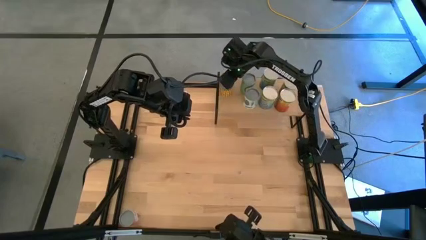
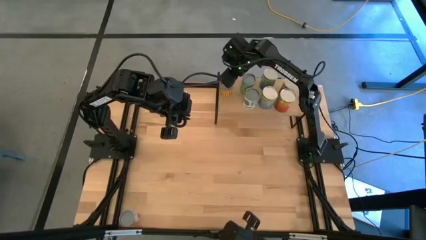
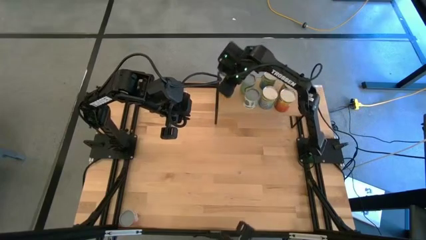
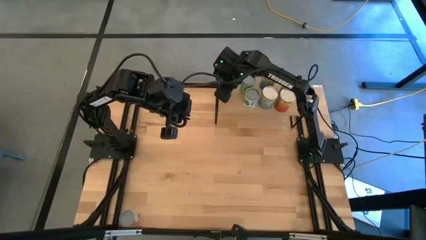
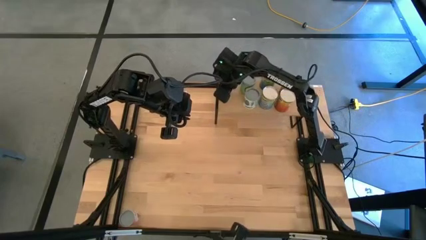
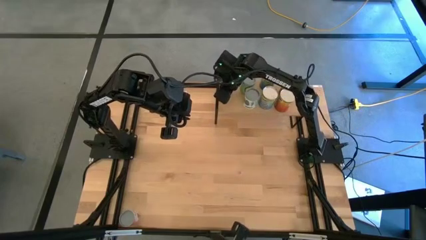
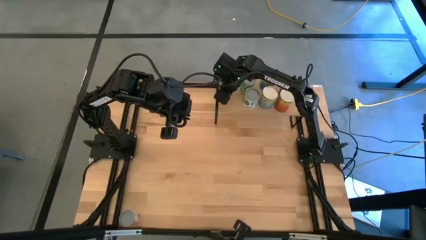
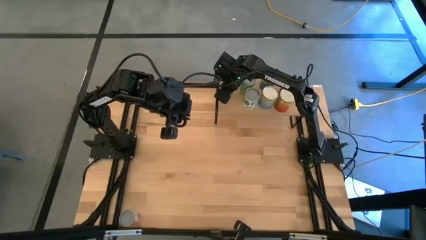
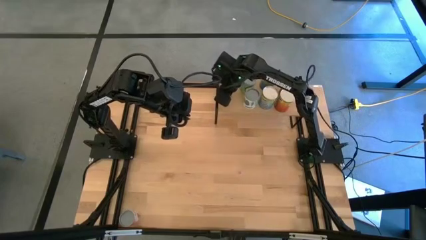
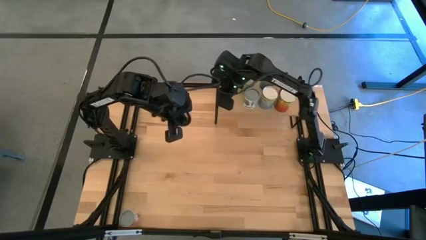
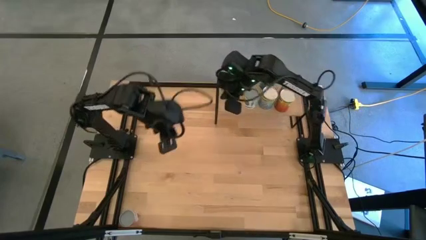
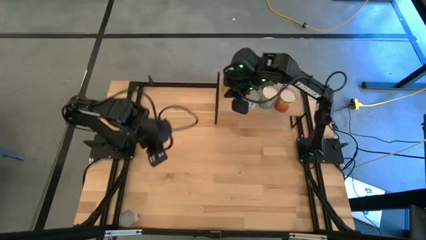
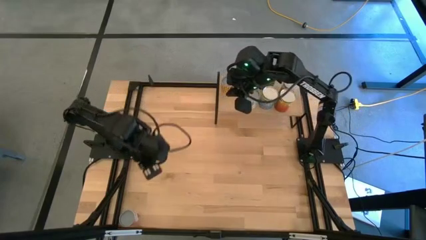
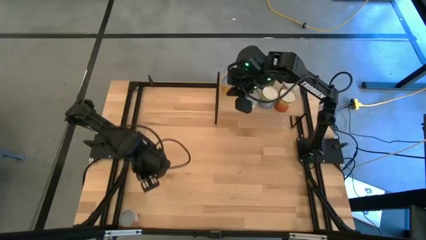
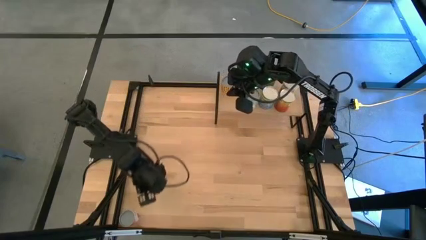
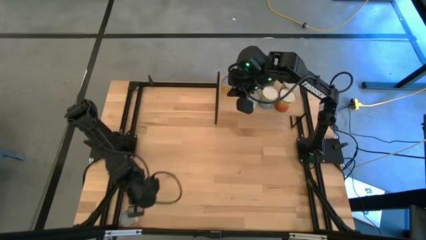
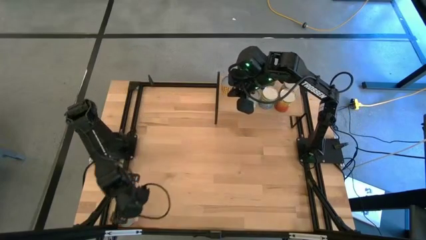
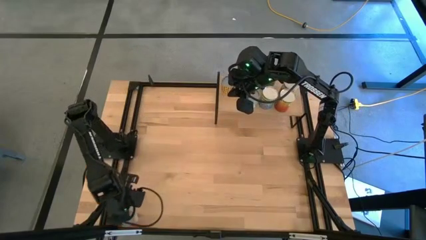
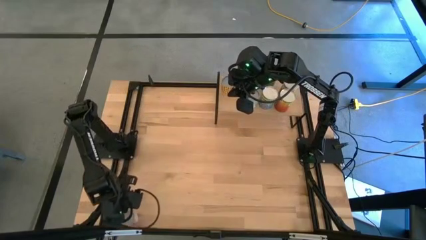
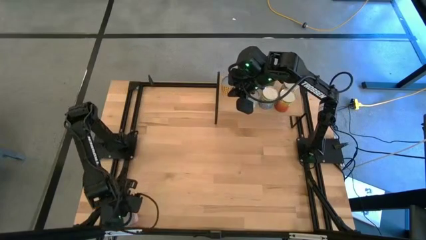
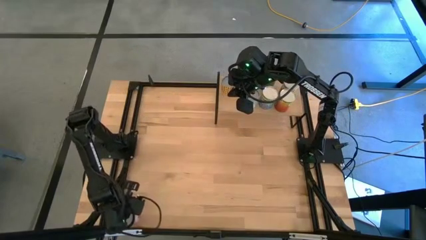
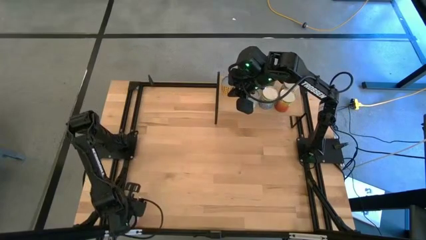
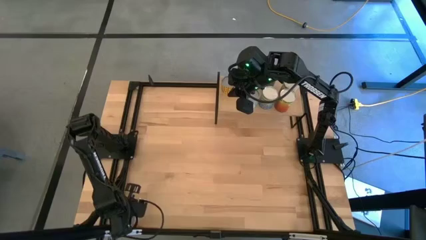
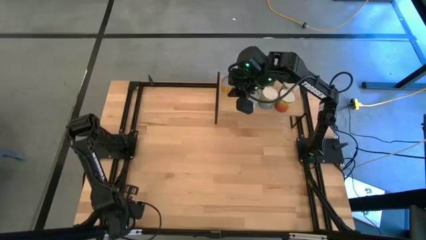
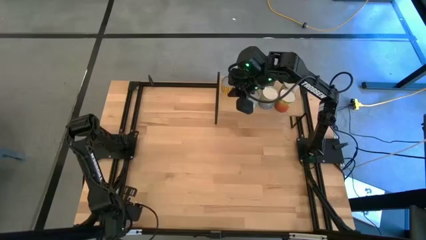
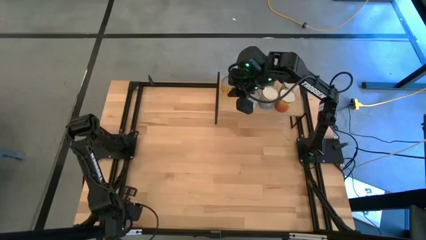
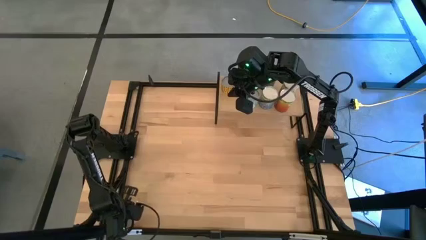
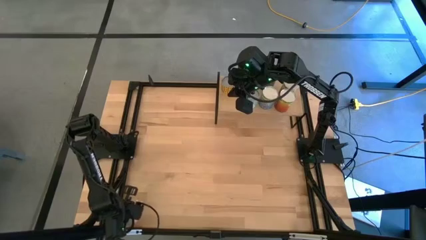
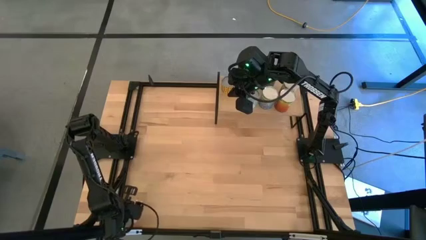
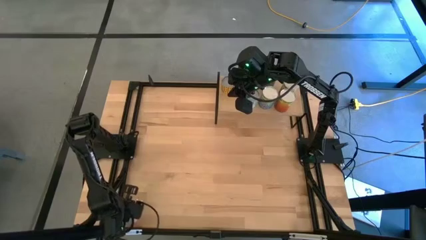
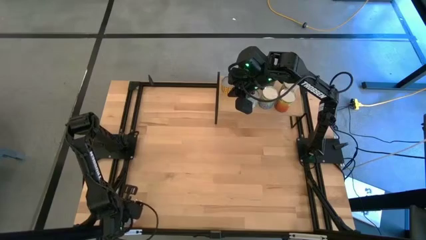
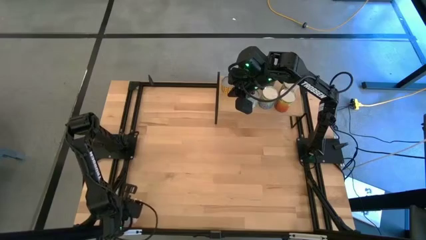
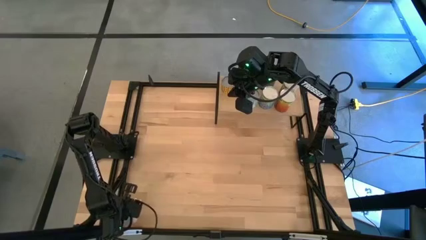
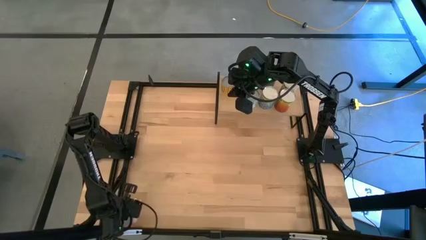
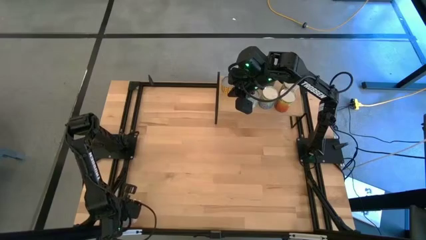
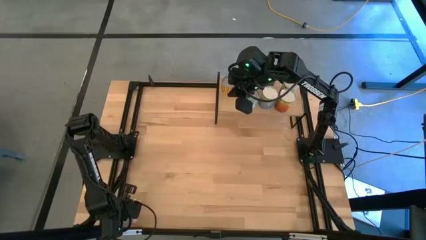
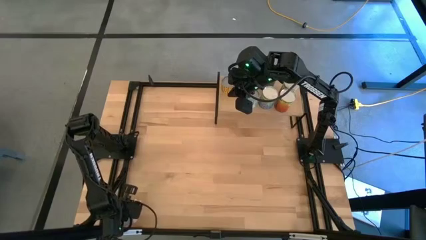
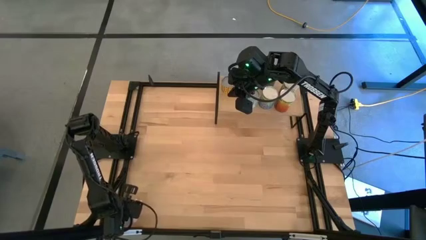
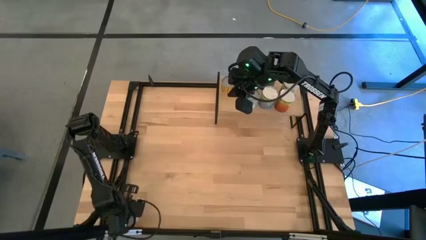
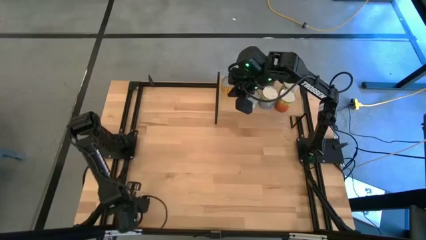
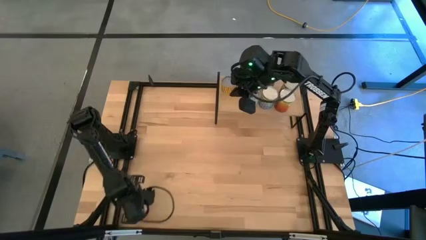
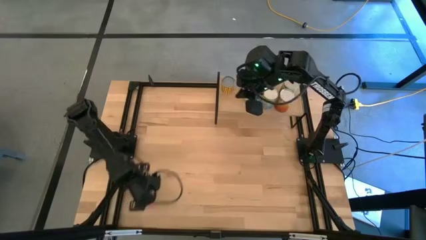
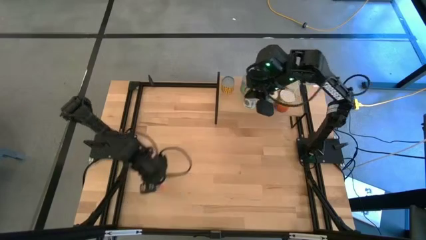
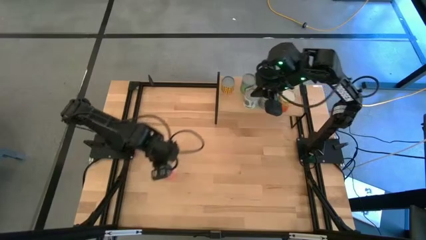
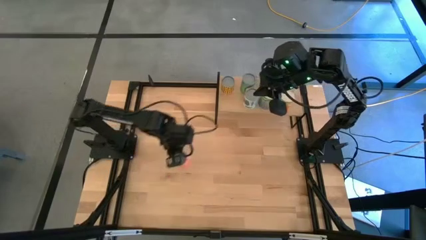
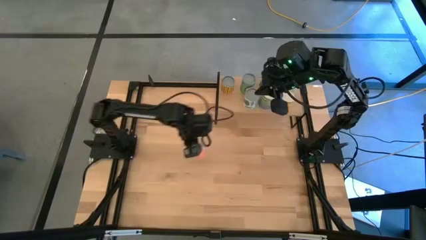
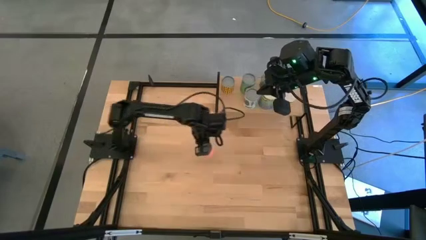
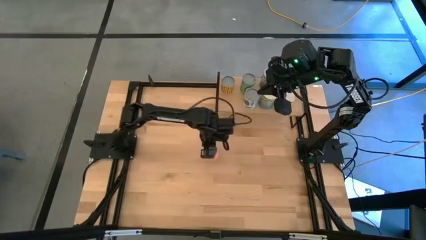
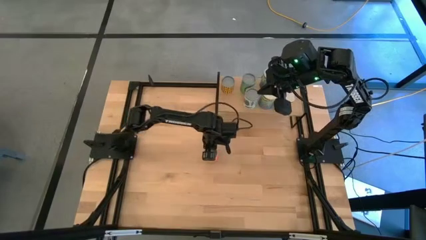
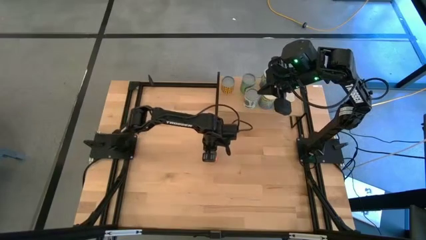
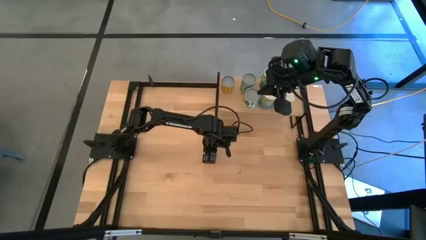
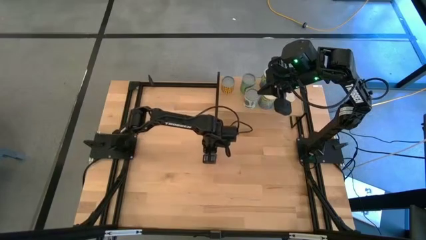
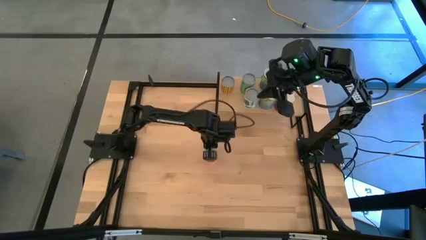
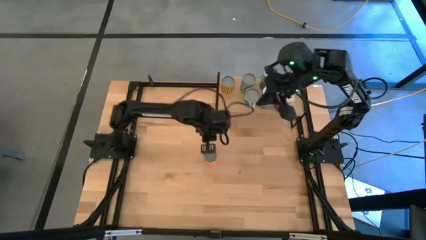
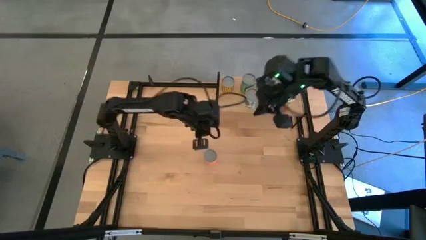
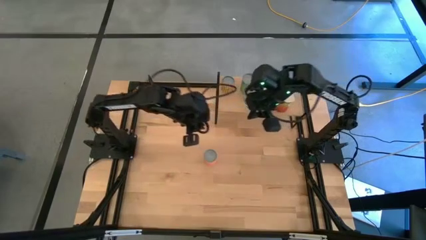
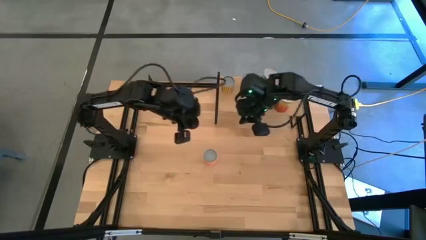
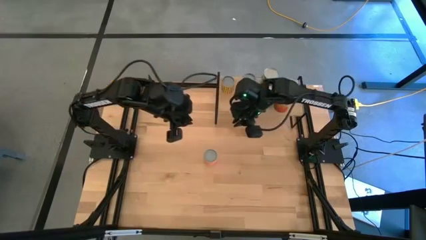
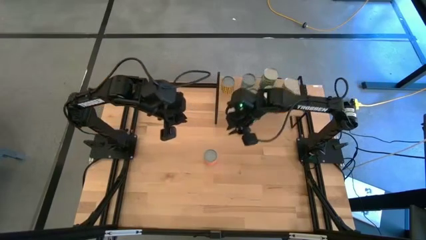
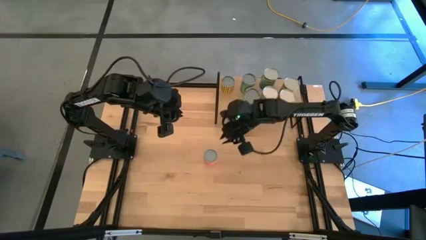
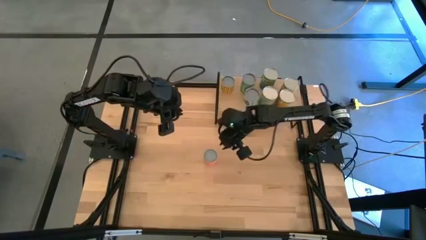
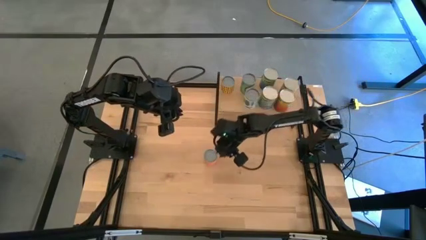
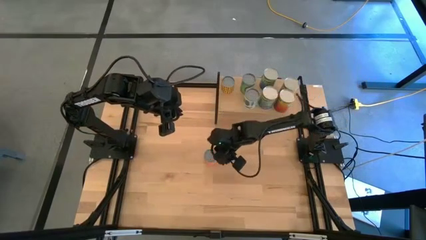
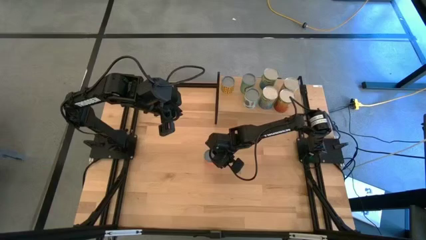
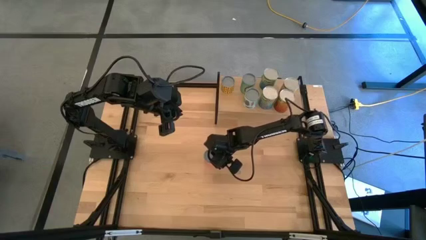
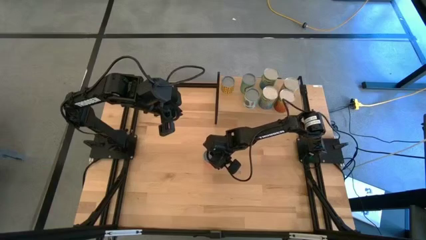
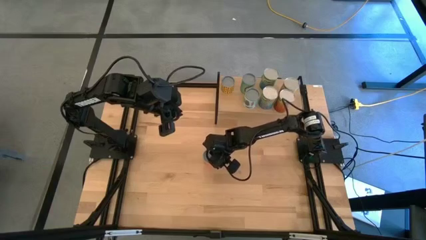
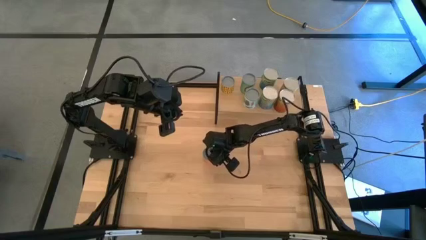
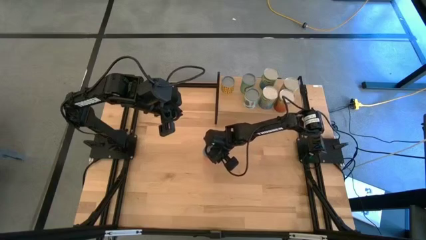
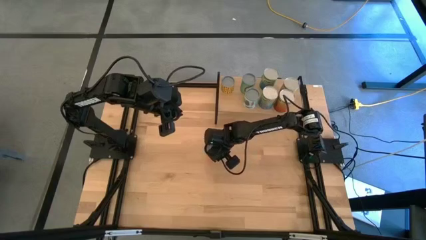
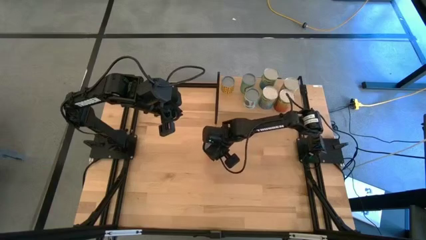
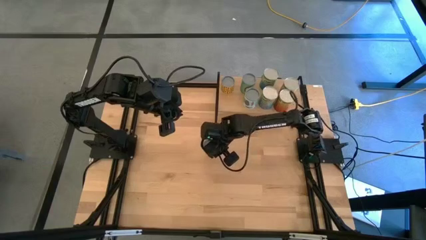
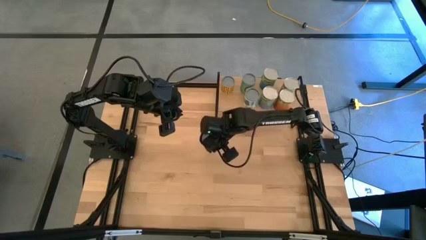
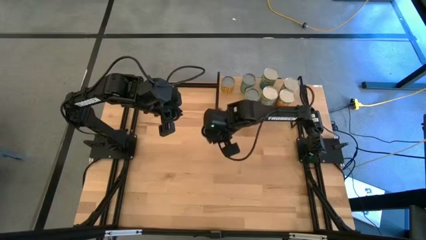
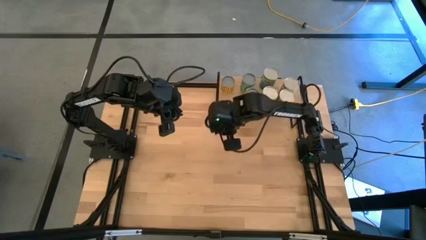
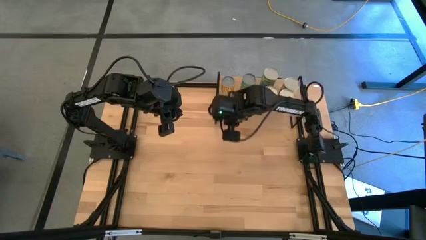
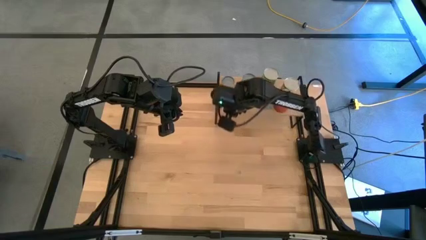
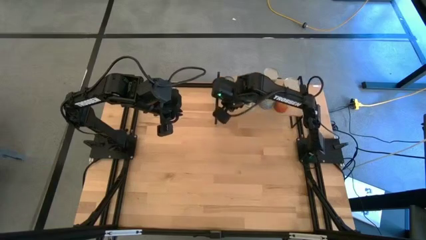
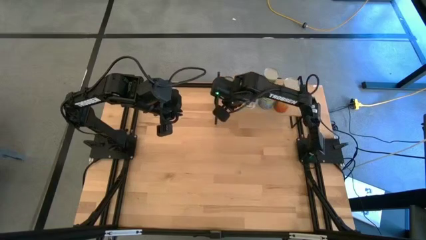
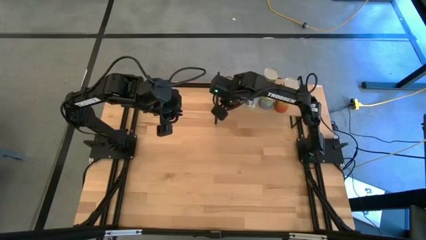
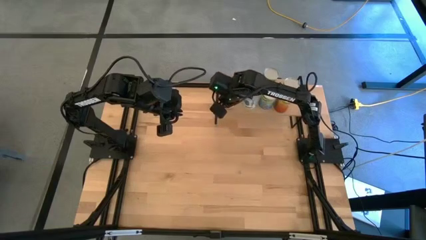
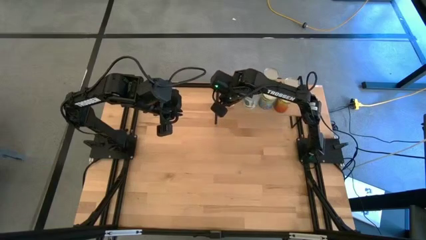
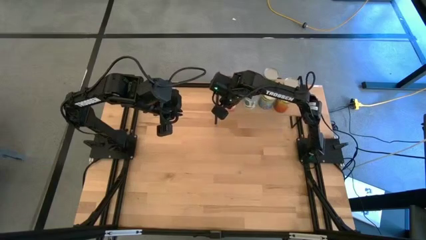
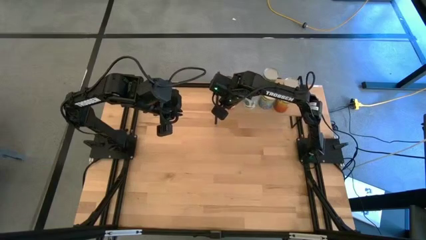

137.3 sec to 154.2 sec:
Task: Pick and place cans onto a shelf
Put the light orange canned good on the shelf
